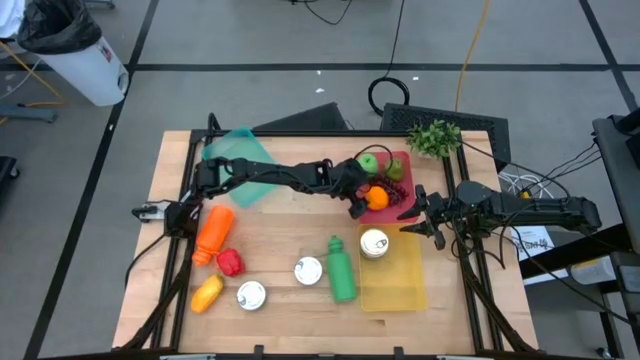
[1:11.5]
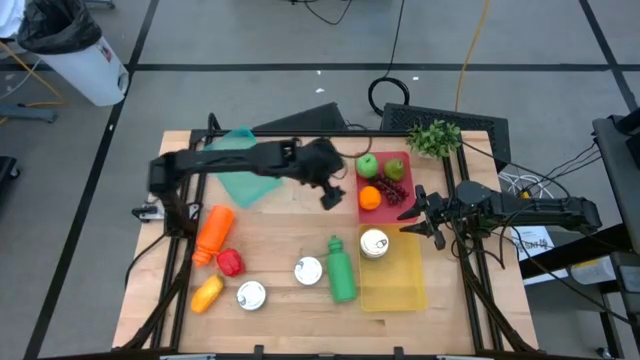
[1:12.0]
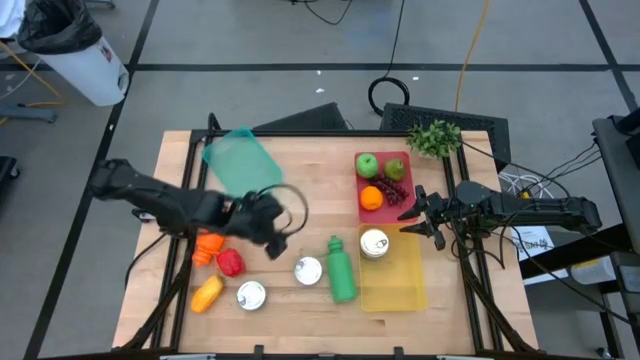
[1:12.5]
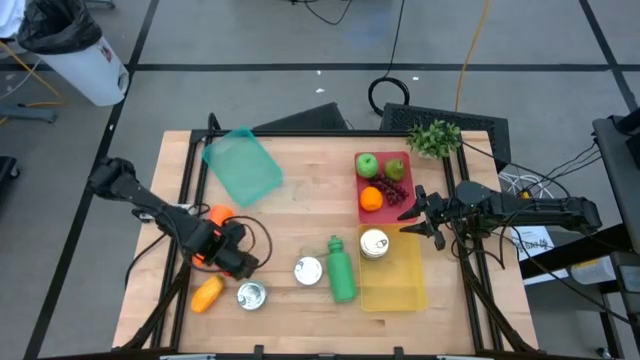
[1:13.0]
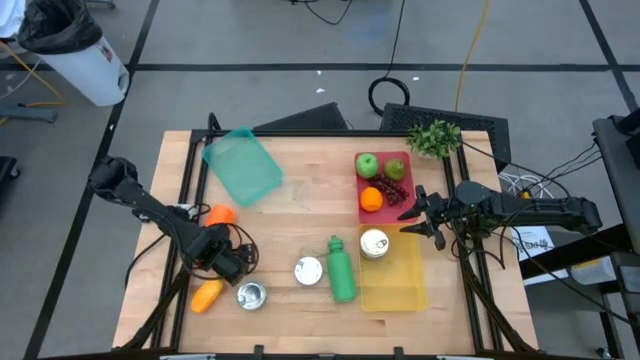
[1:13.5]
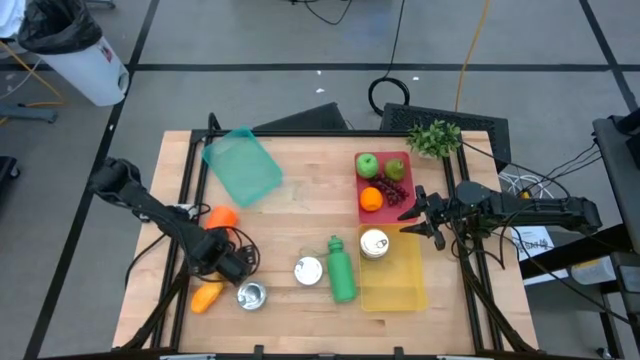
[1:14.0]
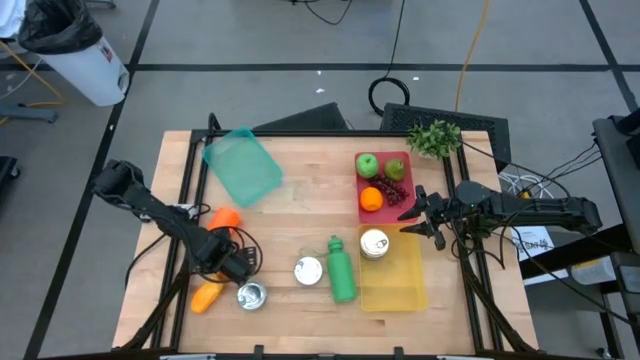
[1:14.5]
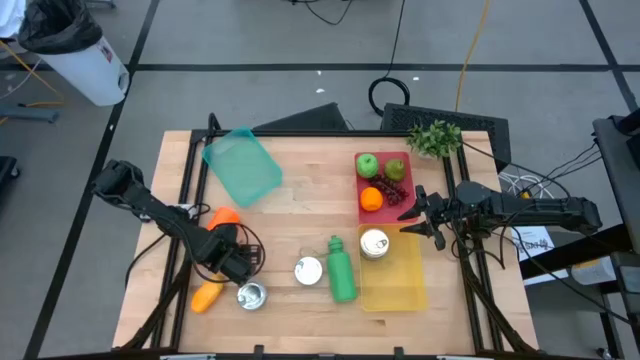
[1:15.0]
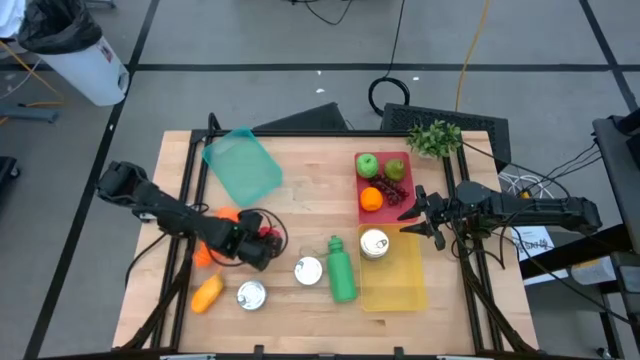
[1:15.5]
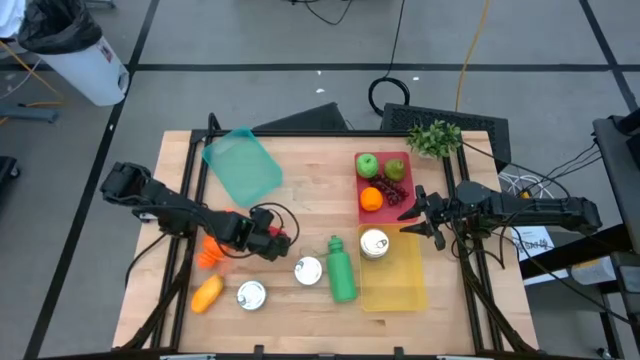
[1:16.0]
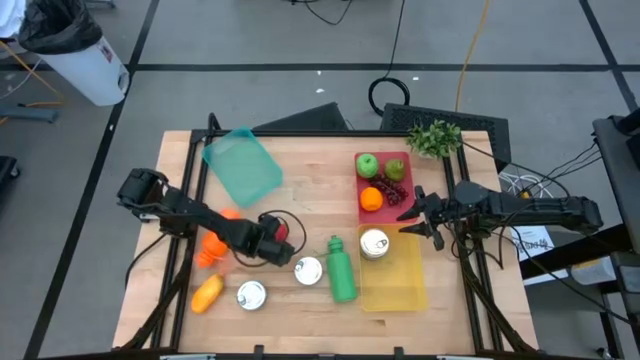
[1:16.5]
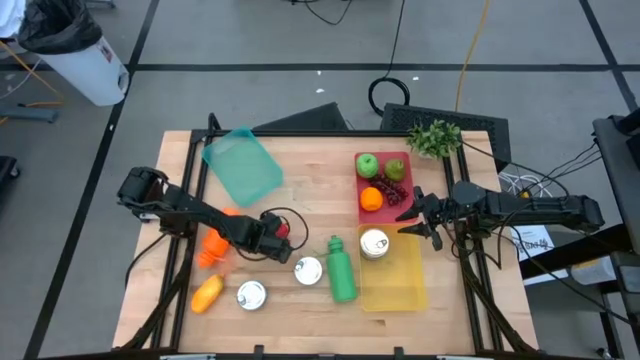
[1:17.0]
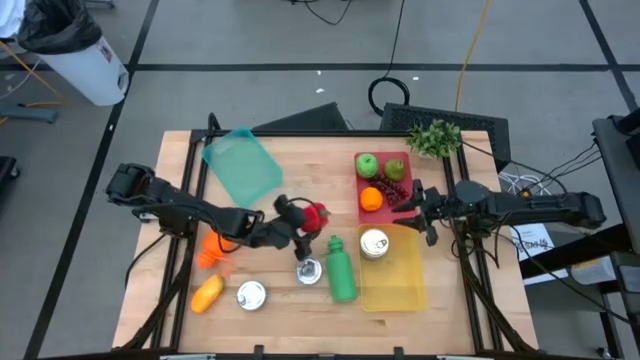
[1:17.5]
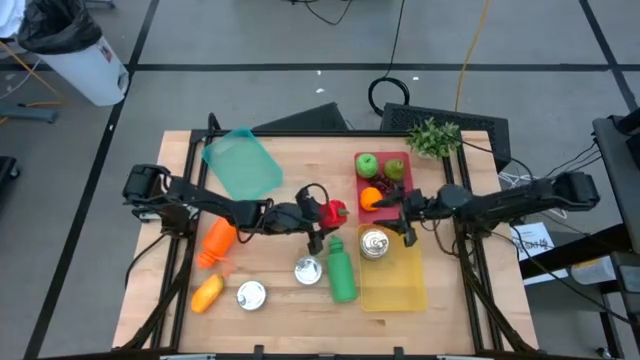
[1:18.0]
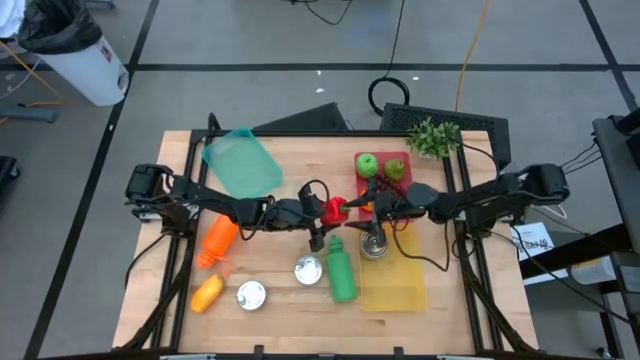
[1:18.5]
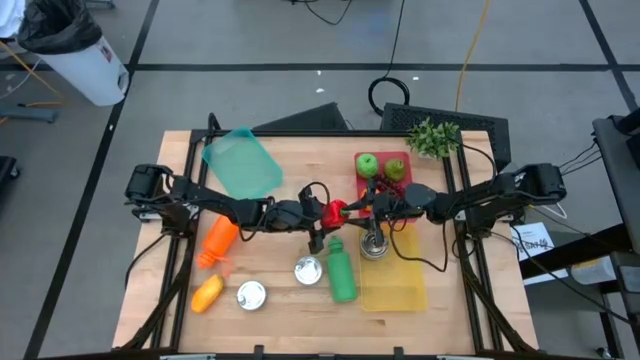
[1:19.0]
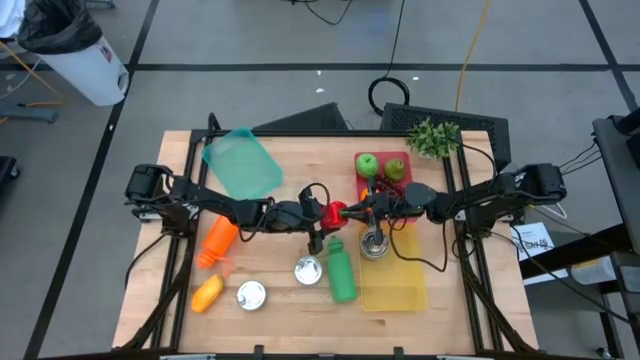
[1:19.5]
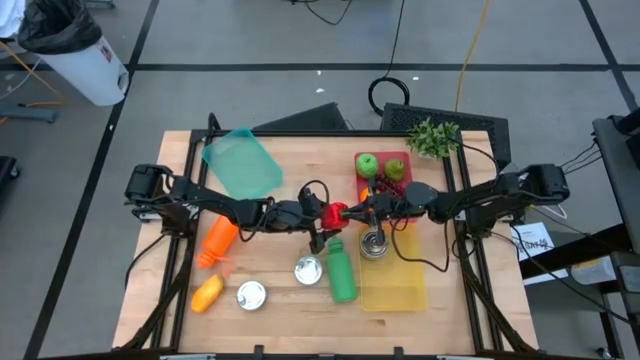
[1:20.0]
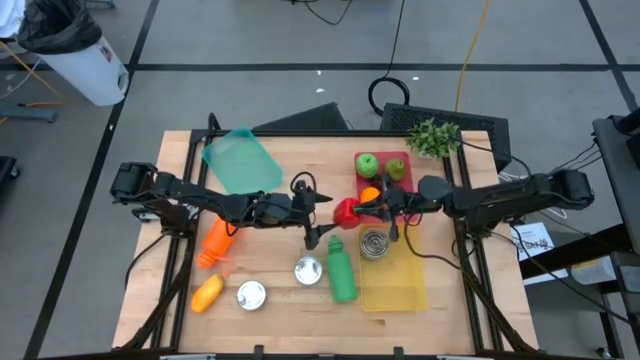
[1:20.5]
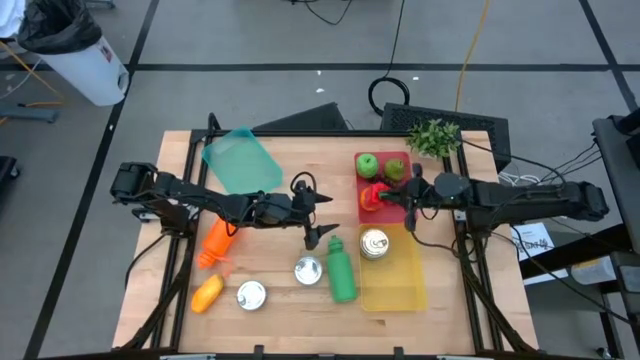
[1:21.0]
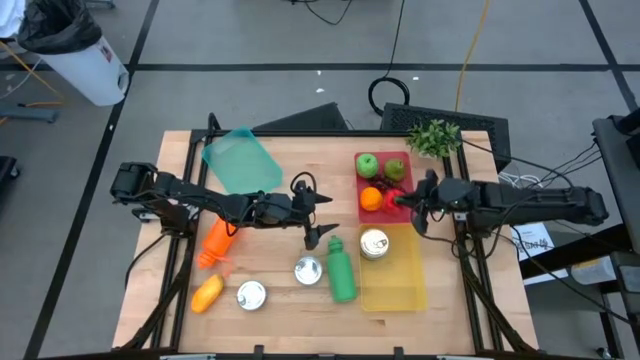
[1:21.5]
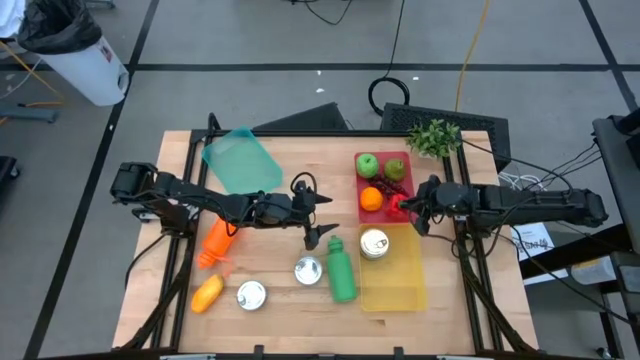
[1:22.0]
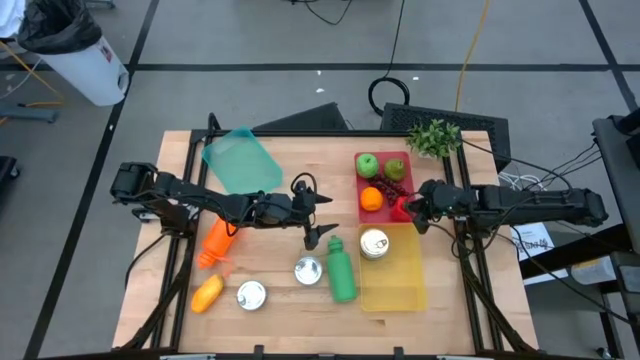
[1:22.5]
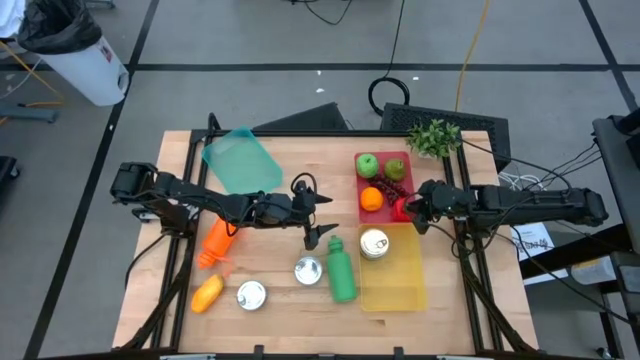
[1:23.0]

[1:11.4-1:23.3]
Task: Pick & Place Food Item
Put the red bell pepper into the pink bin

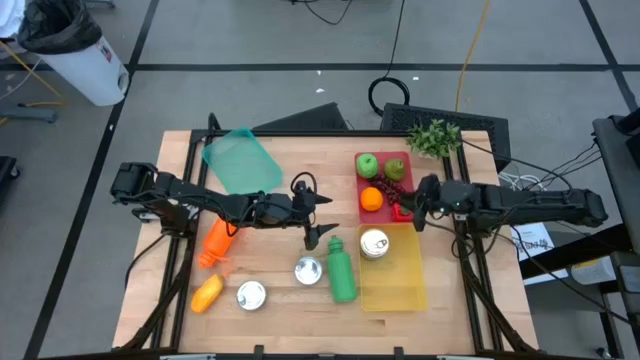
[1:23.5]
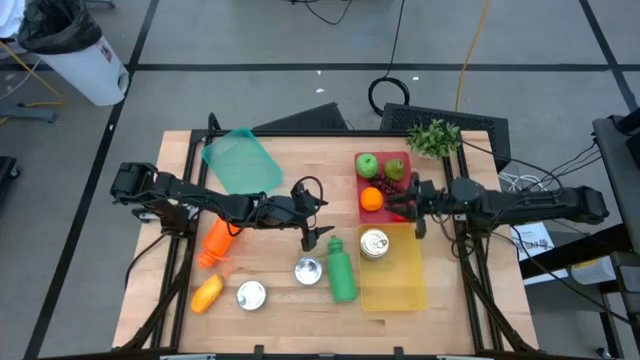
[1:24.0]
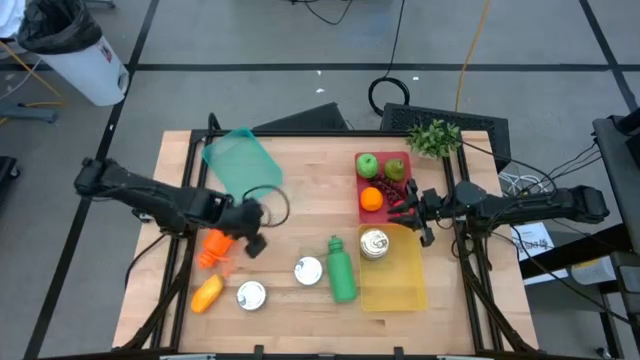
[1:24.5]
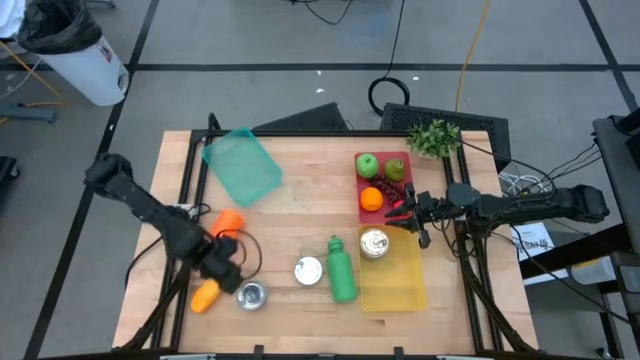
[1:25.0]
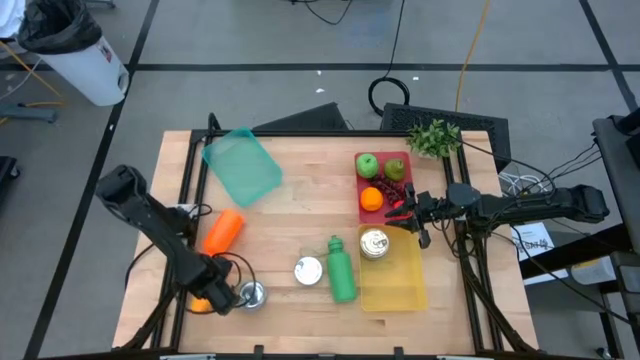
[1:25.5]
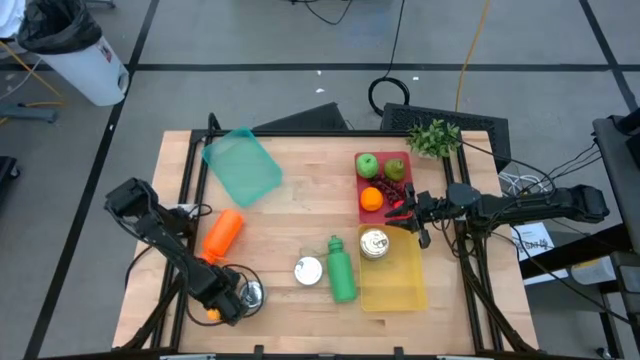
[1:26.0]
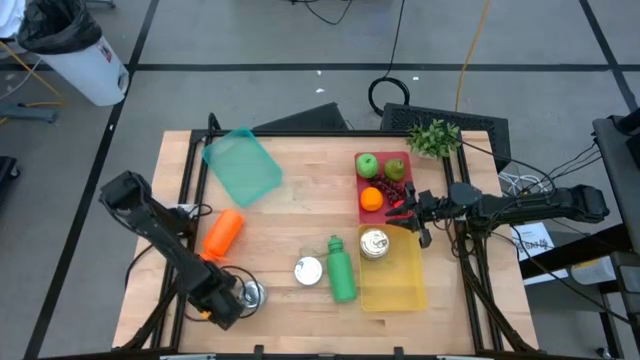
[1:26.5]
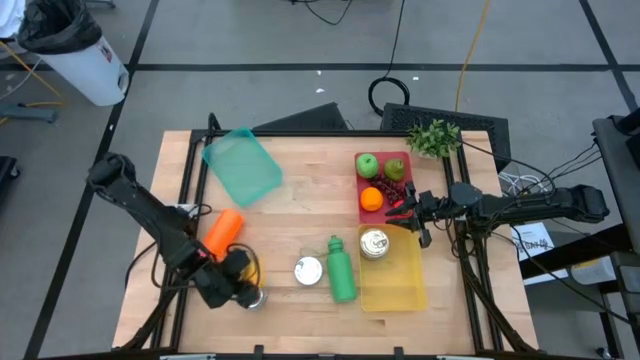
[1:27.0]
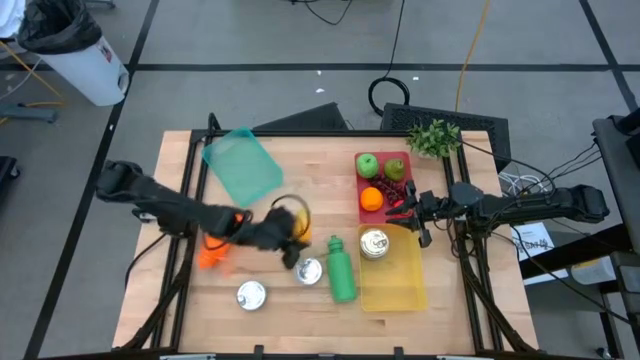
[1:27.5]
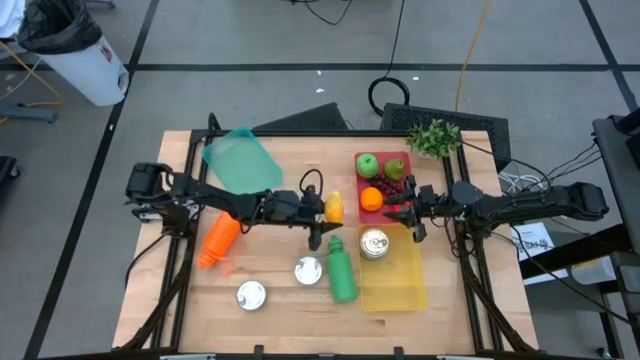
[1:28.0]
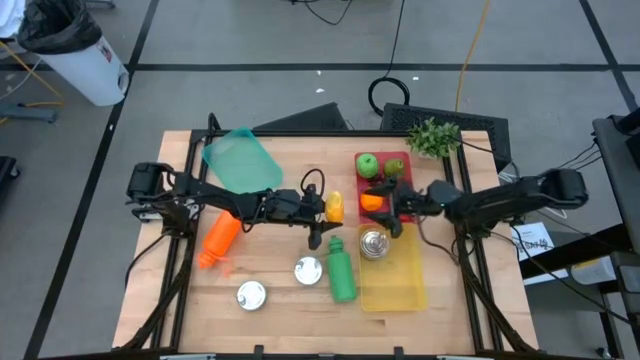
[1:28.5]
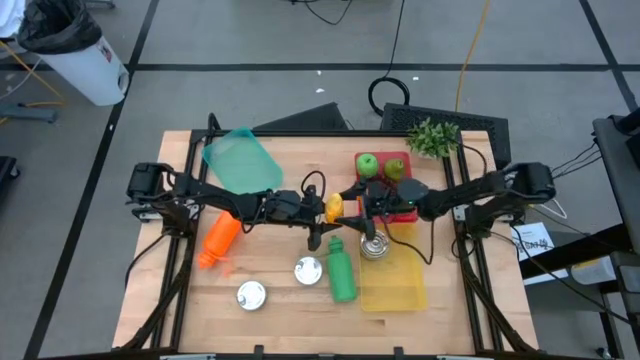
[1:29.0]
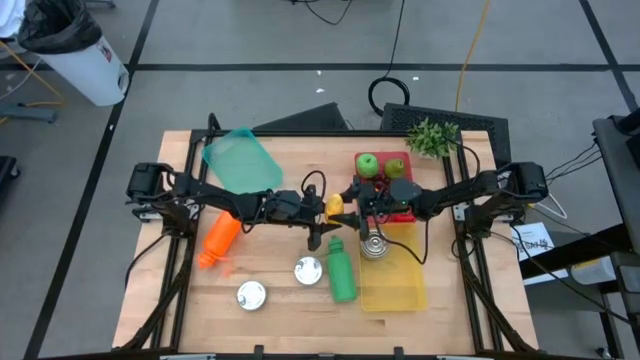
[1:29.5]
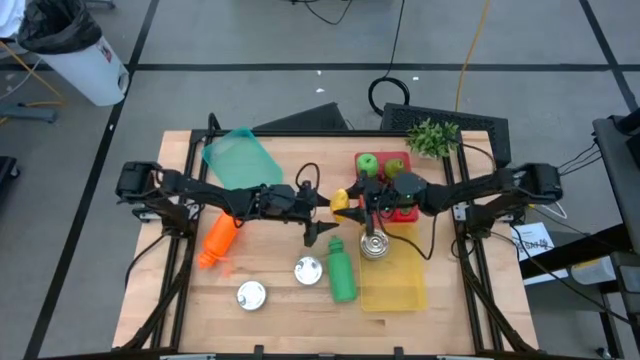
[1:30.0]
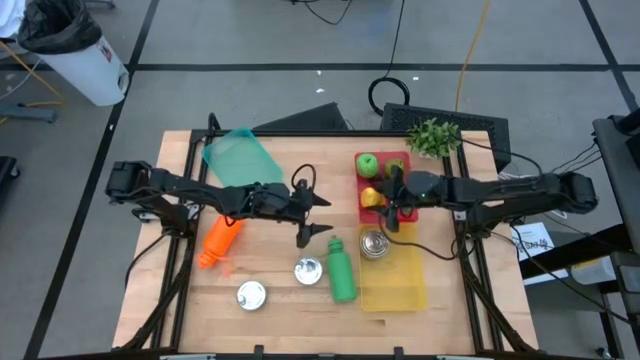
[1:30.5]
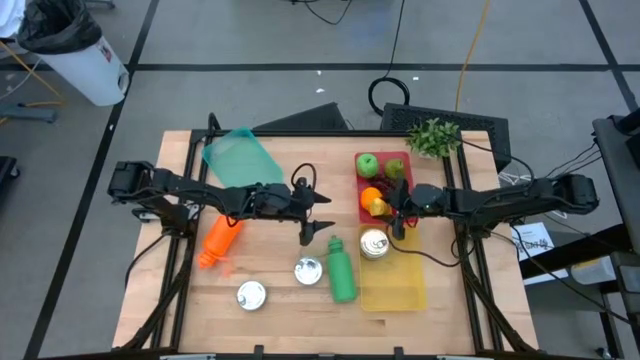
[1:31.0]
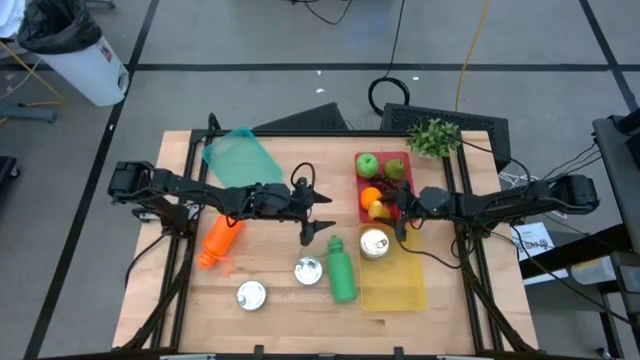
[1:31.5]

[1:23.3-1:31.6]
Put the yellow mango into the pink bin
